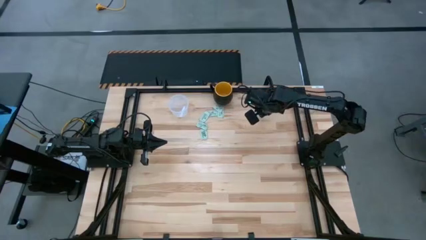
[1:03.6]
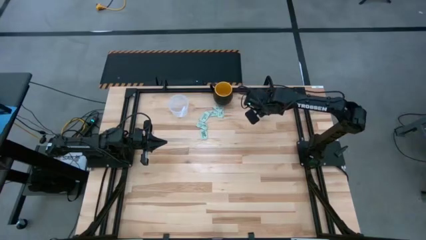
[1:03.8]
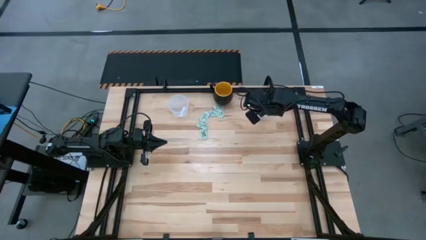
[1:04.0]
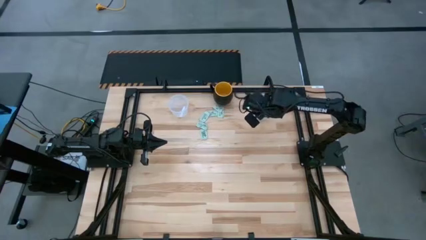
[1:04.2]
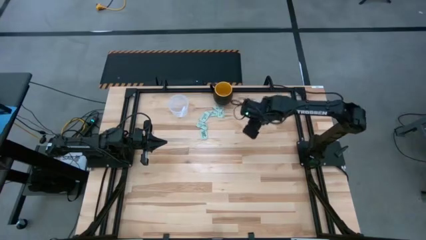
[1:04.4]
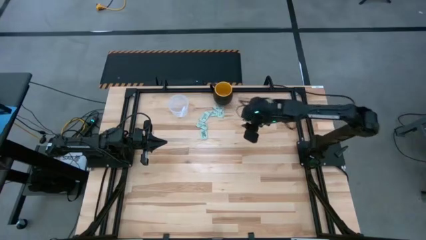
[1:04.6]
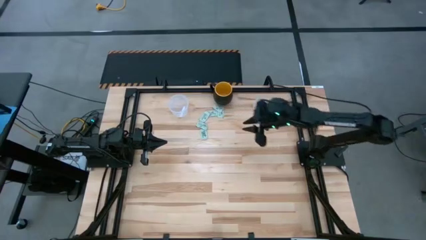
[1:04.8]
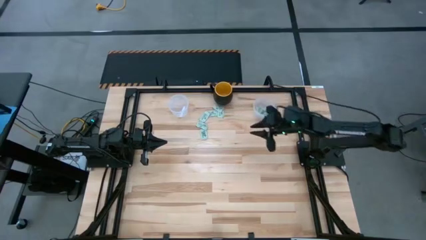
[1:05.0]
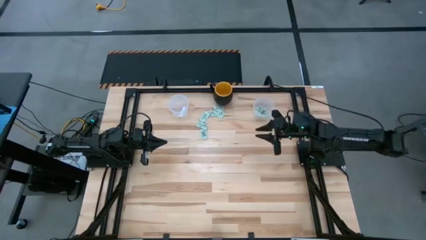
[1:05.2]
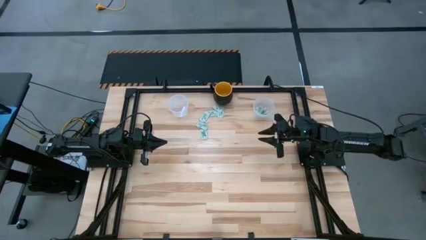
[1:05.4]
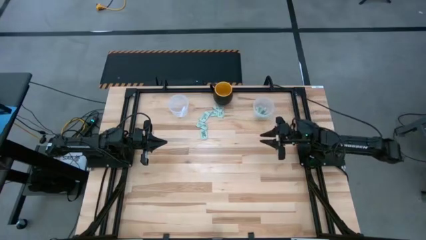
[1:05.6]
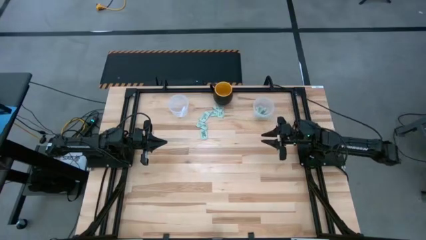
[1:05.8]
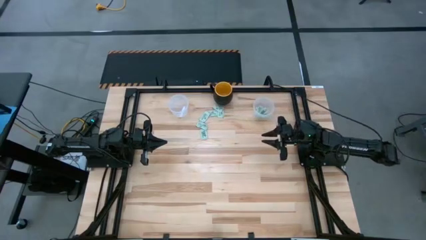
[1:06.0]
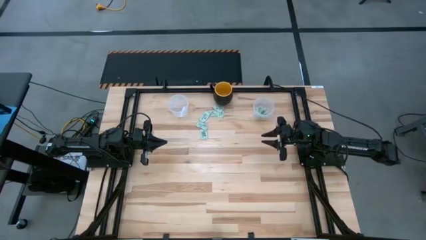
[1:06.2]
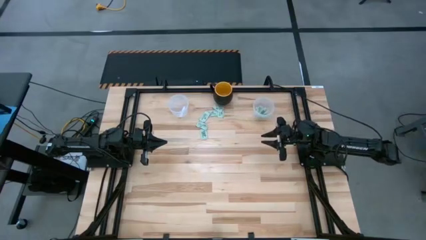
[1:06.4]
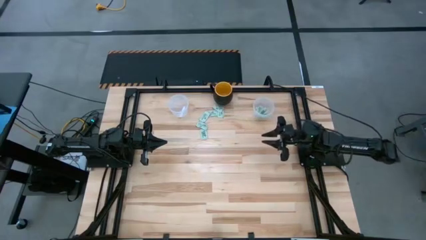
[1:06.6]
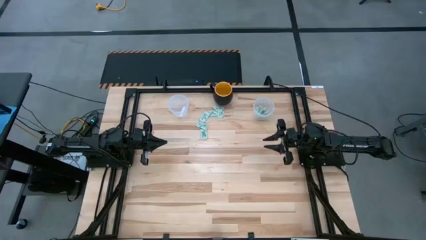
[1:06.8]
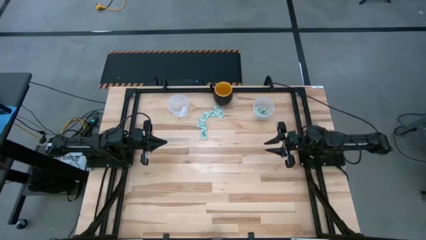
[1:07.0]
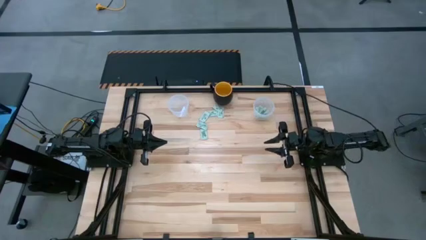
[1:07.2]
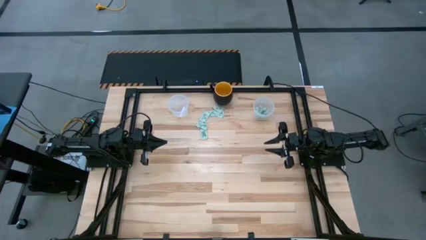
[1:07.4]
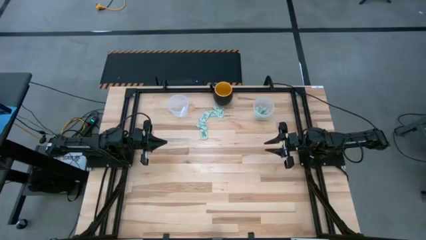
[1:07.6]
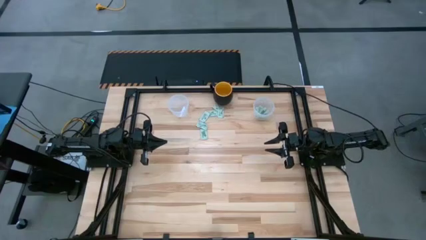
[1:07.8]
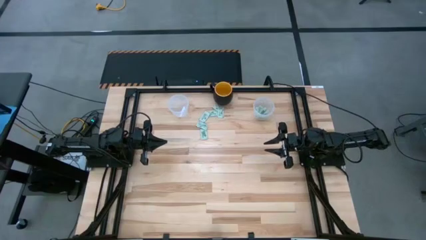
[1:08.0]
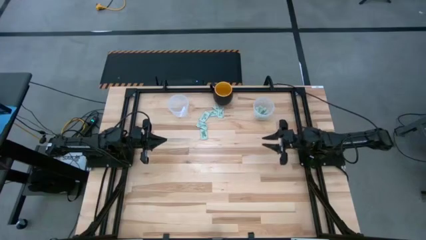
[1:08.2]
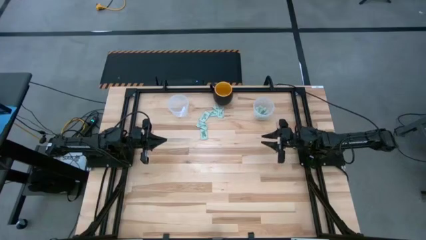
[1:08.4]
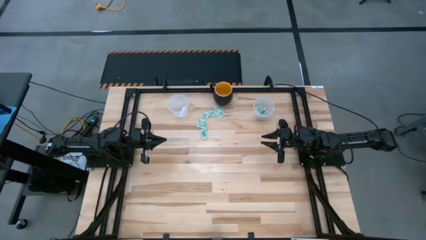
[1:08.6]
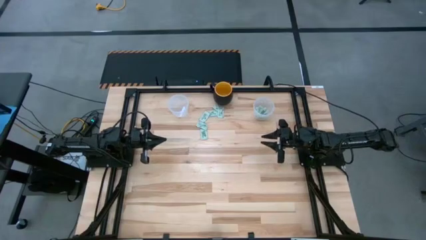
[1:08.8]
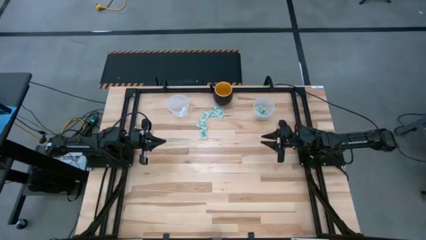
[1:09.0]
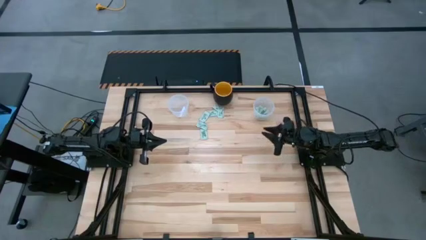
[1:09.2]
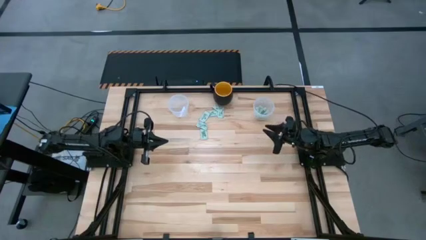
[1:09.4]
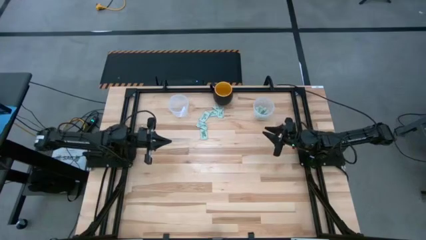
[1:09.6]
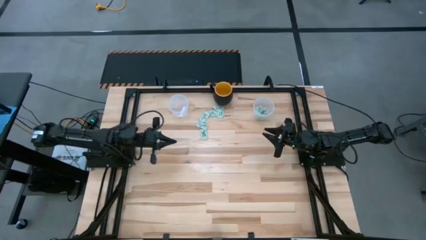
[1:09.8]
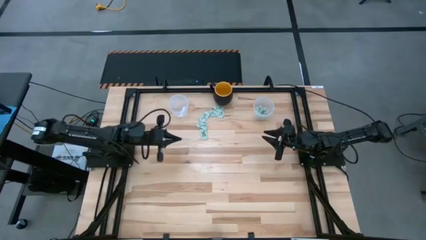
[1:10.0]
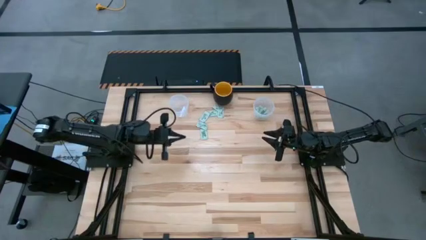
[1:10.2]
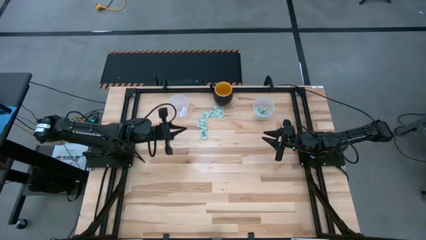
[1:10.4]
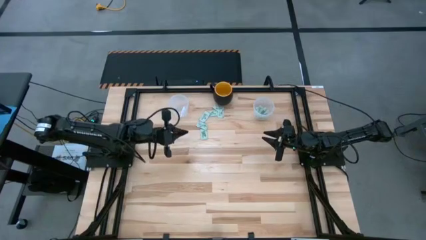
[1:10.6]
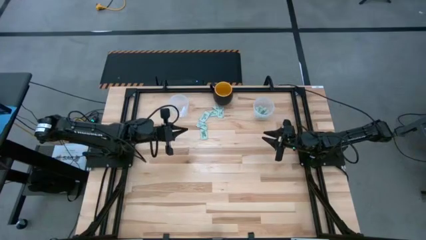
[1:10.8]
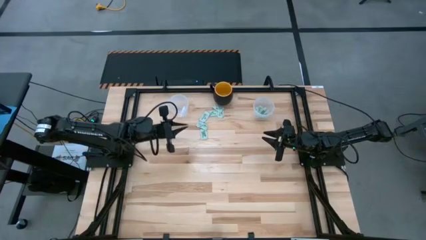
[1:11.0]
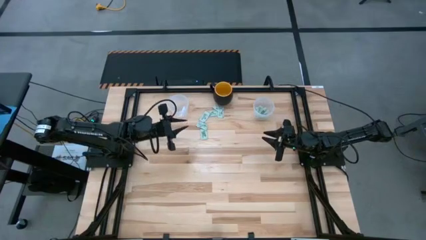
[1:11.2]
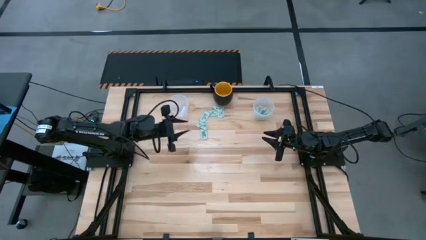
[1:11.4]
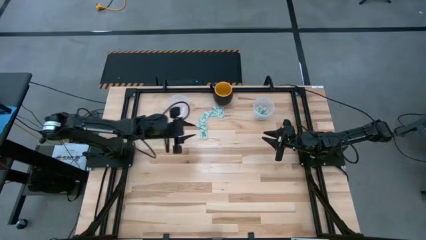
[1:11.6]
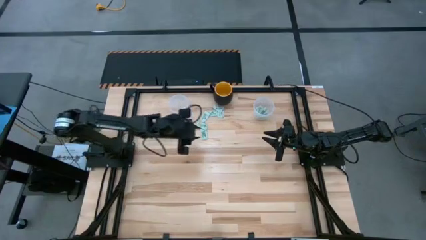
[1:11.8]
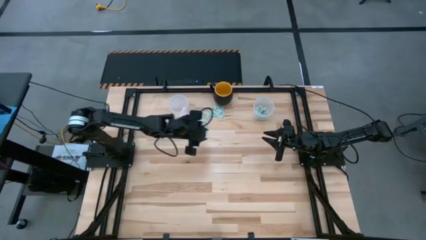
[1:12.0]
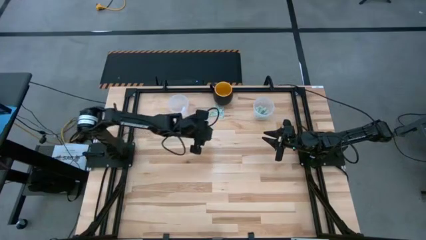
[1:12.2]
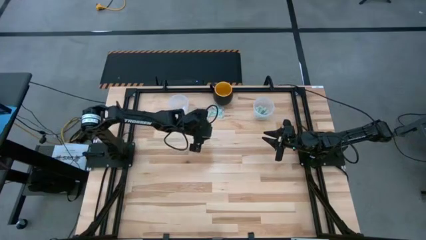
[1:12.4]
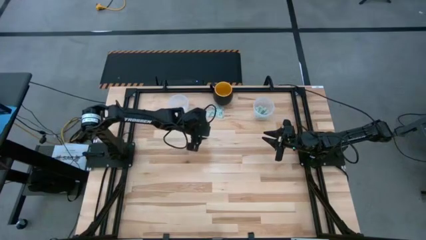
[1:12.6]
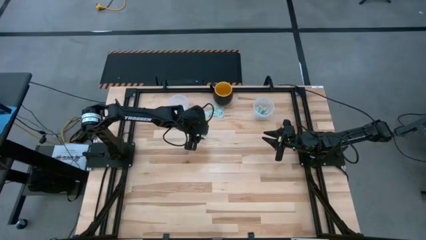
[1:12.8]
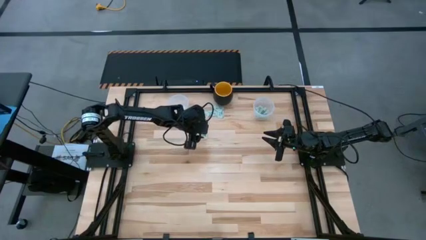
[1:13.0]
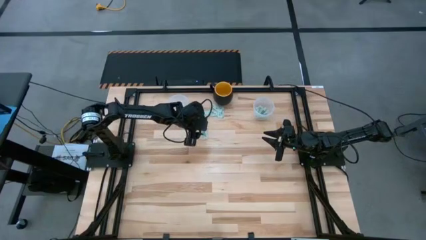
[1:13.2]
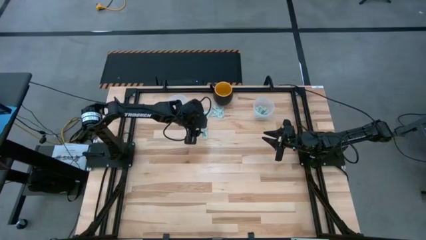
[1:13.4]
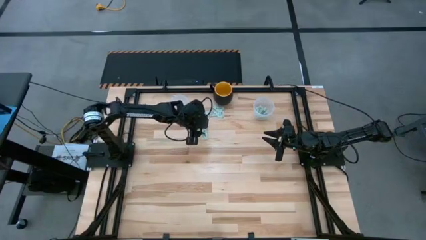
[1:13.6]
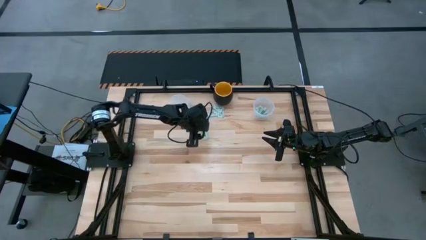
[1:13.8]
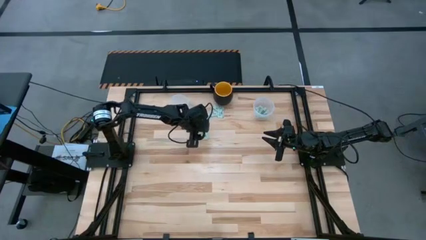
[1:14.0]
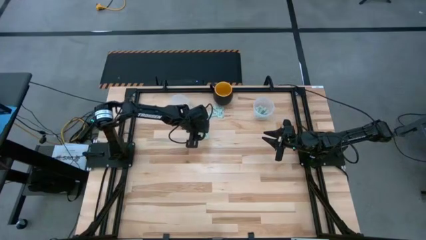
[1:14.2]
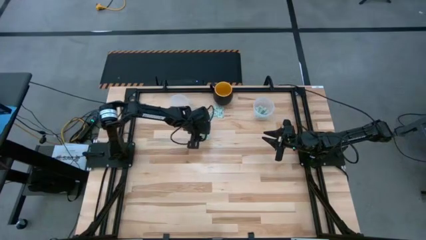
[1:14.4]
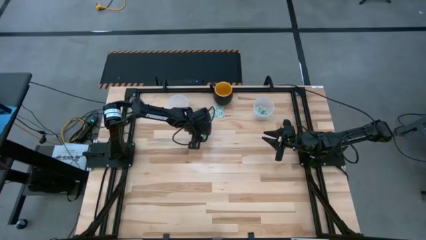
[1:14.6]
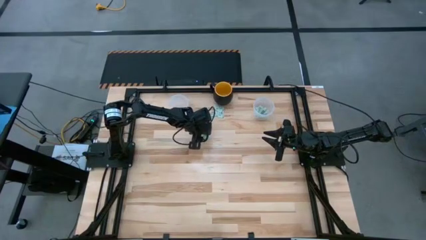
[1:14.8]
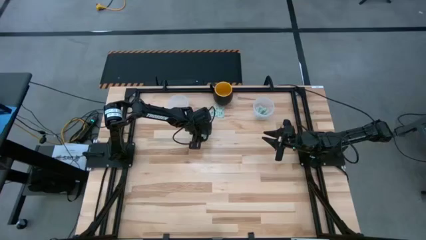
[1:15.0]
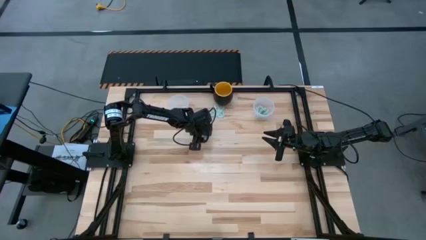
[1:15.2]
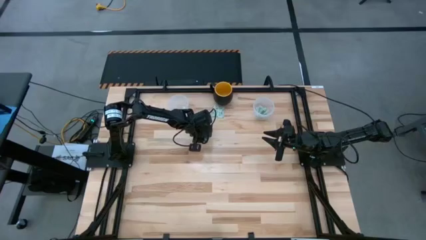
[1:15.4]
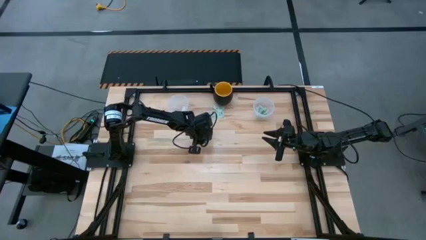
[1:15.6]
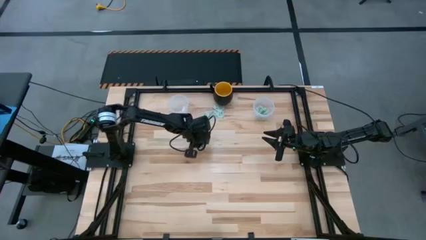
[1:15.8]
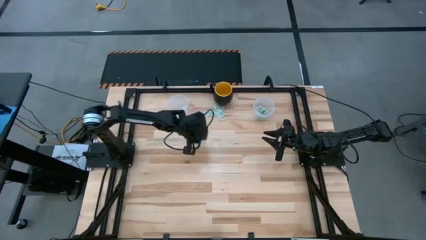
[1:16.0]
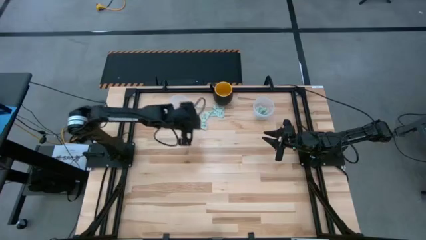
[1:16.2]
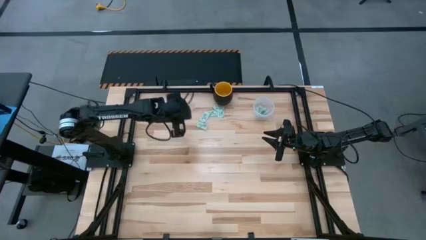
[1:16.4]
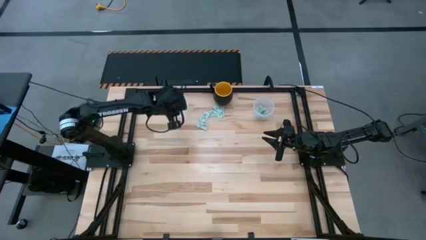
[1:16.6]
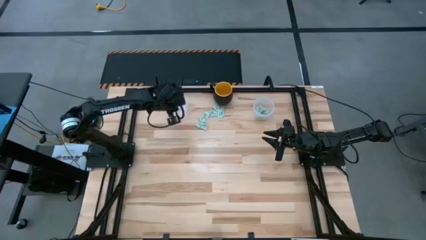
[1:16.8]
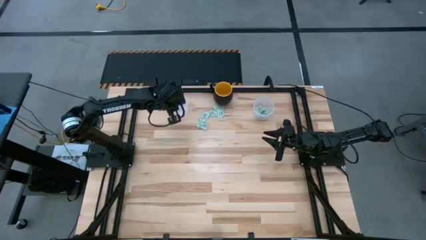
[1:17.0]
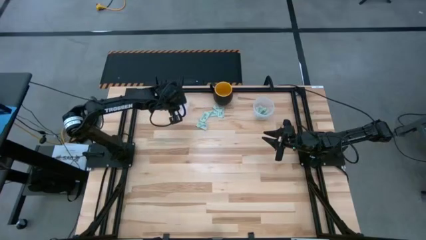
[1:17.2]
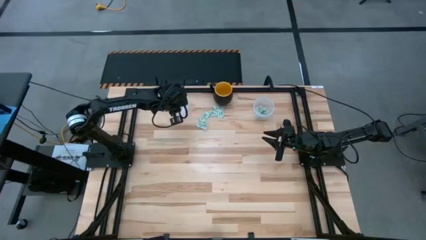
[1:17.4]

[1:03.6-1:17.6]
Task: Pick and place Stevia / Truvia into bins
Put the stevia packet into the left transparent container

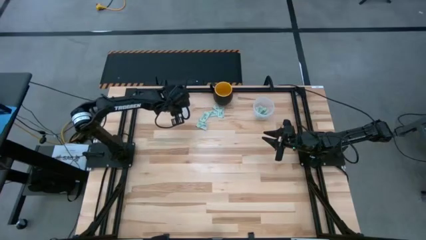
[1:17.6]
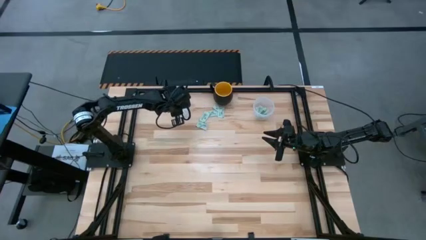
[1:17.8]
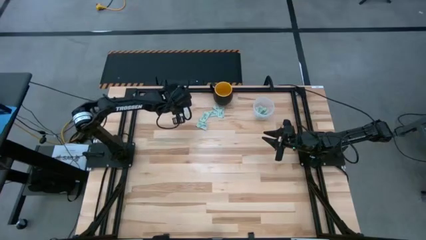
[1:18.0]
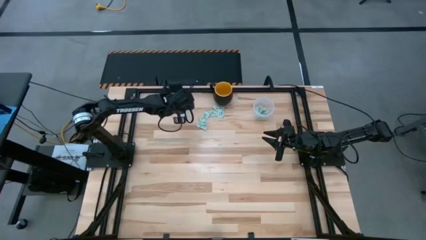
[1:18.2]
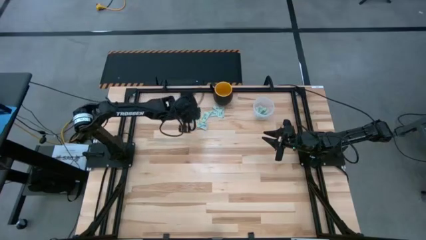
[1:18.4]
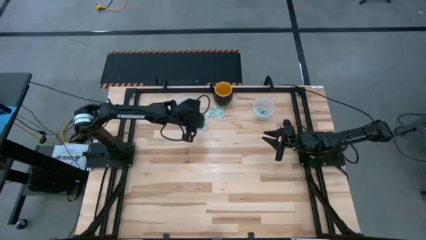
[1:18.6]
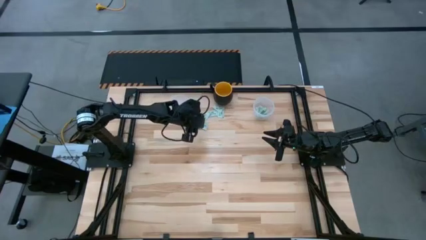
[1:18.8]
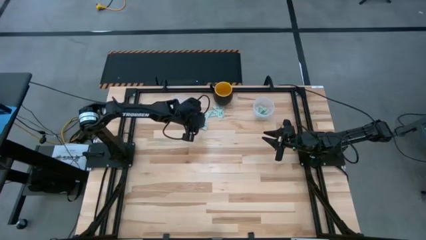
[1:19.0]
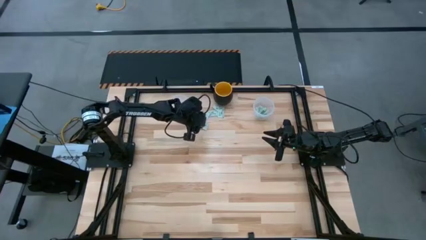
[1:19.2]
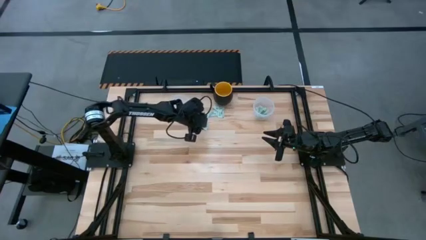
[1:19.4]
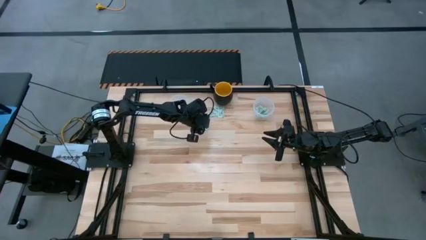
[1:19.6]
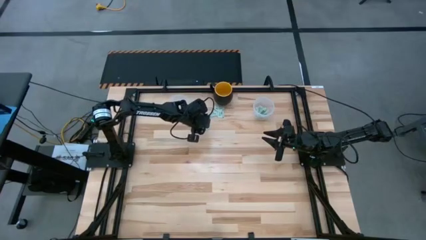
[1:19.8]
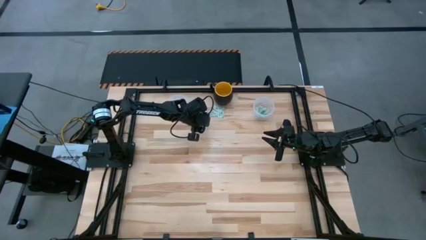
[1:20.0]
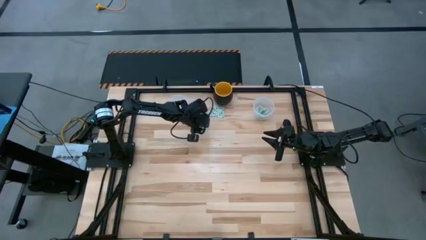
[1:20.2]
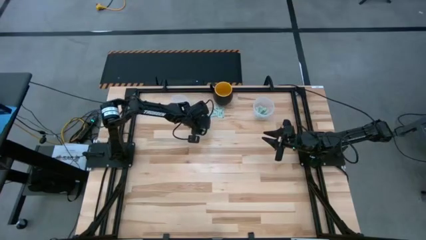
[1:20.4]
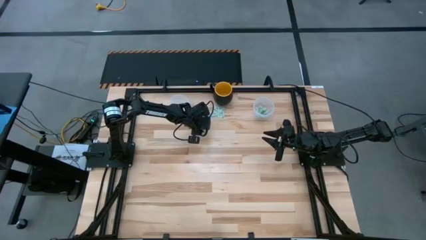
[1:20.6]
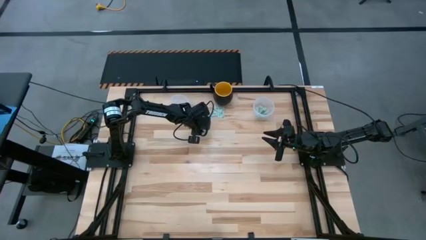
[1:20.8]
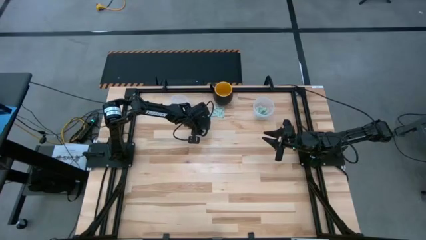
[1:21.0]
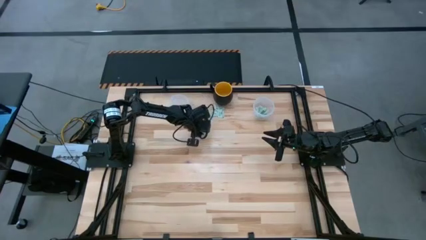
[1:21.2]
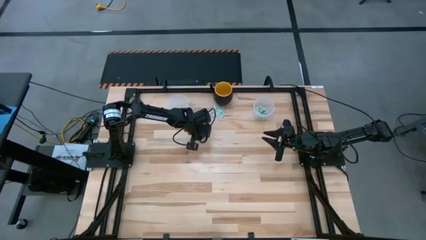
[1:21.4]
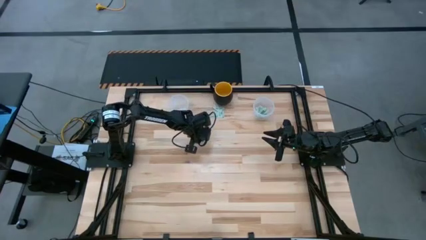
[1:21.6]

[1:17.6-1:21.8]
Put the stevia packet into the left transparent container
